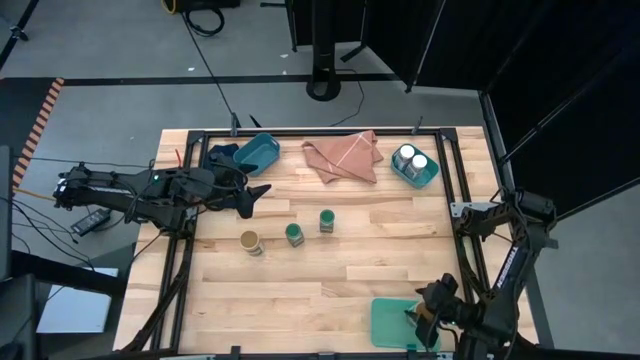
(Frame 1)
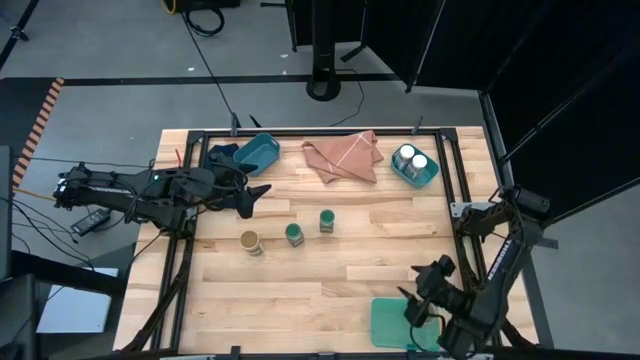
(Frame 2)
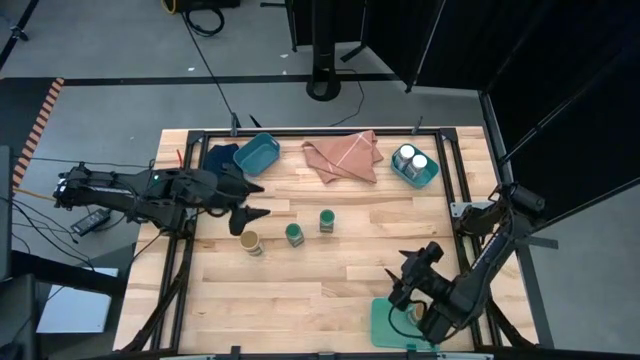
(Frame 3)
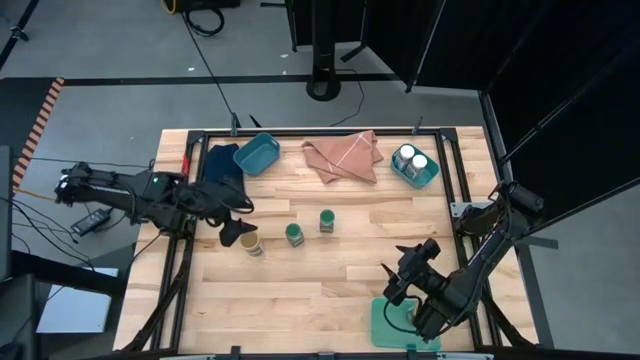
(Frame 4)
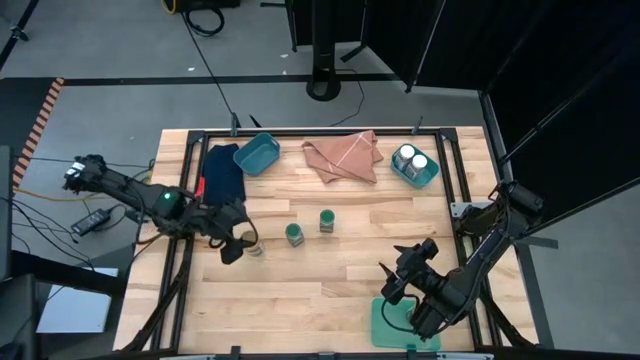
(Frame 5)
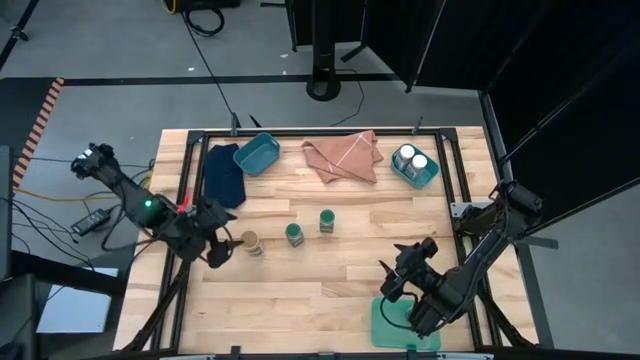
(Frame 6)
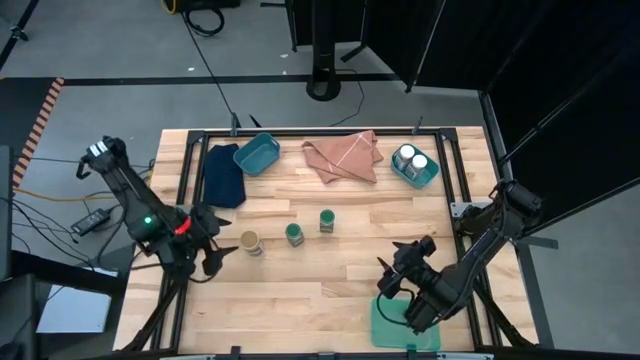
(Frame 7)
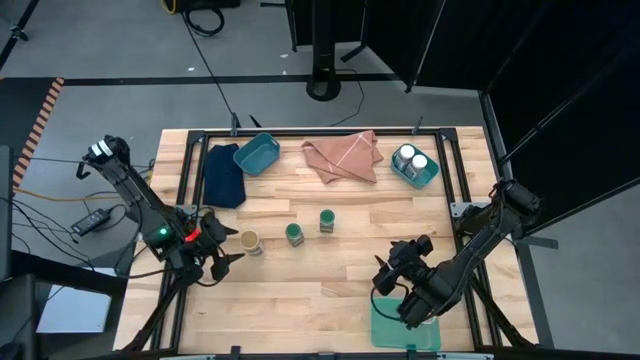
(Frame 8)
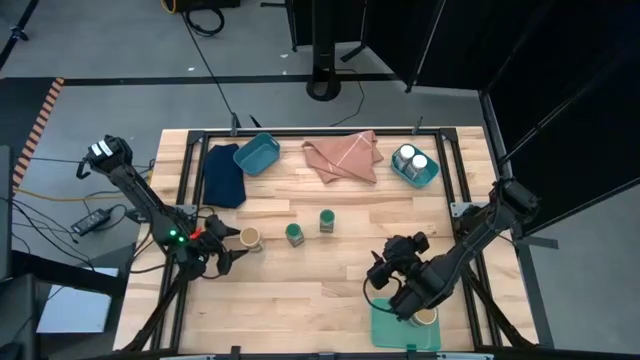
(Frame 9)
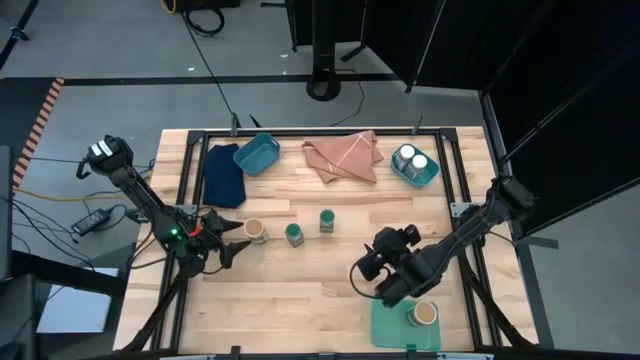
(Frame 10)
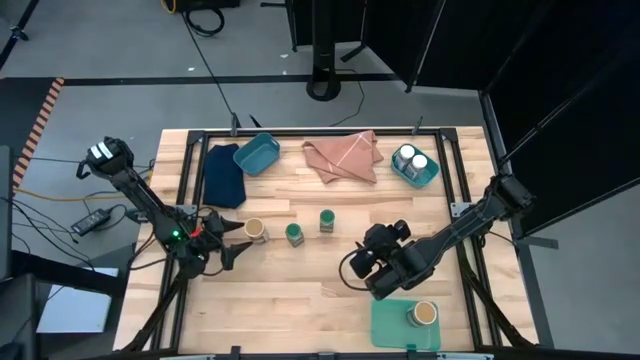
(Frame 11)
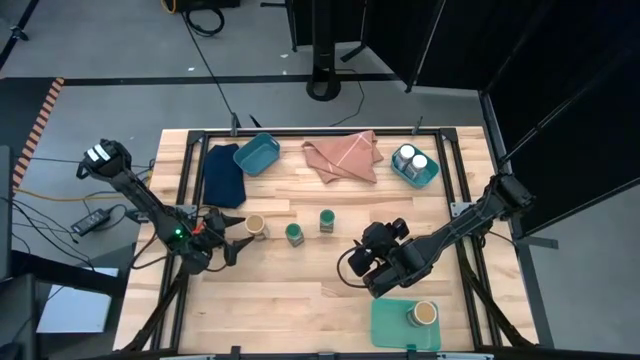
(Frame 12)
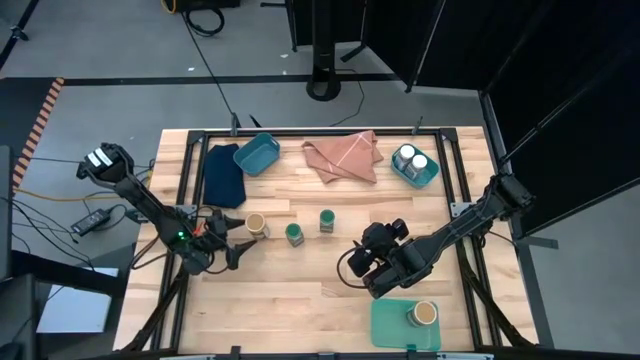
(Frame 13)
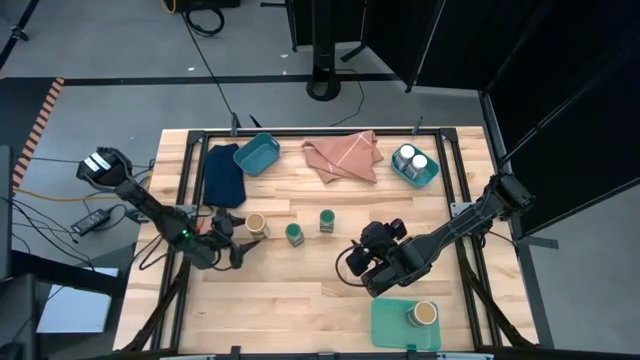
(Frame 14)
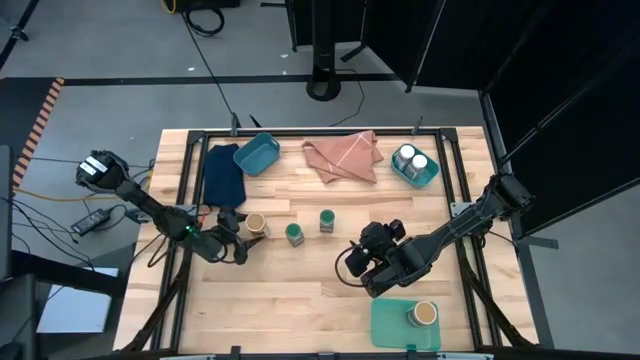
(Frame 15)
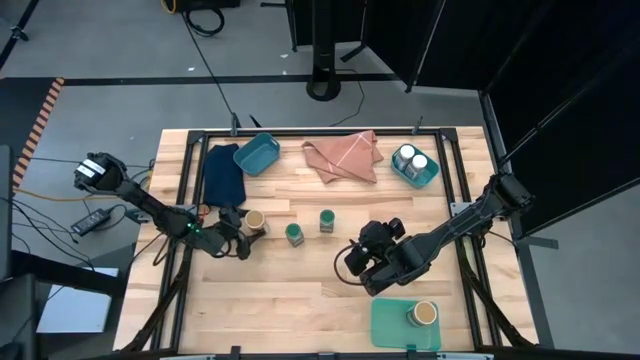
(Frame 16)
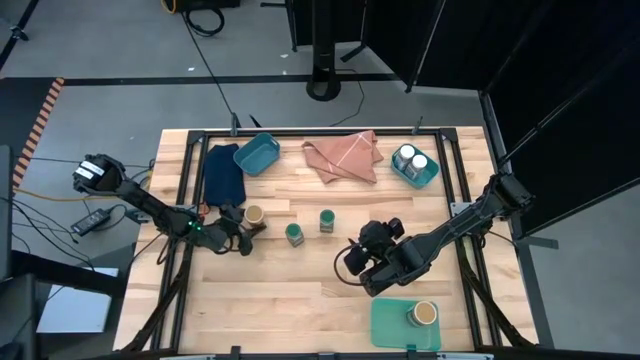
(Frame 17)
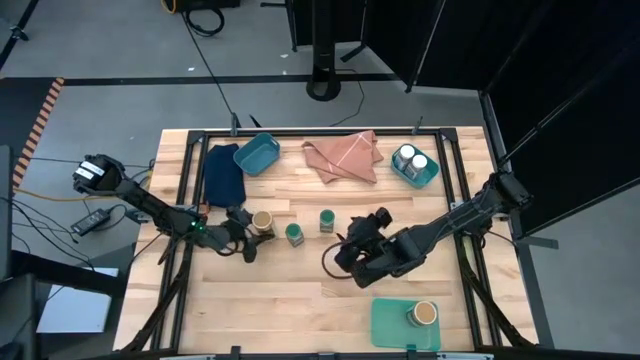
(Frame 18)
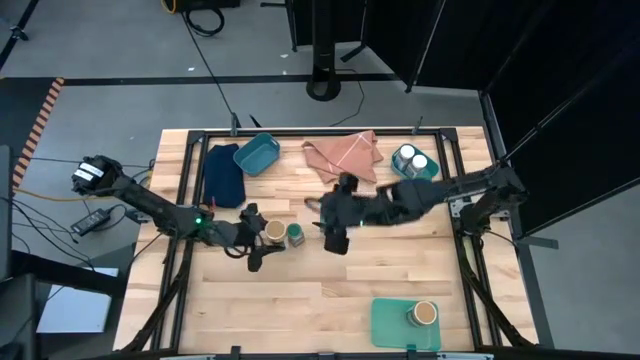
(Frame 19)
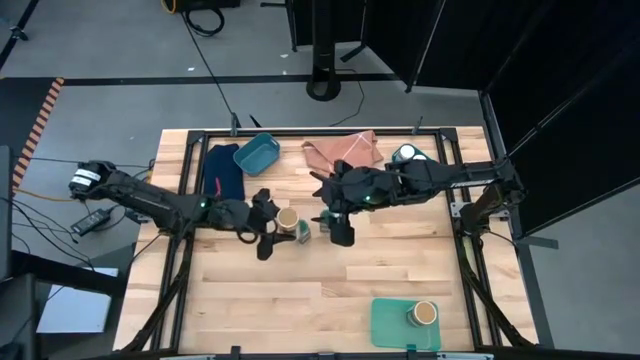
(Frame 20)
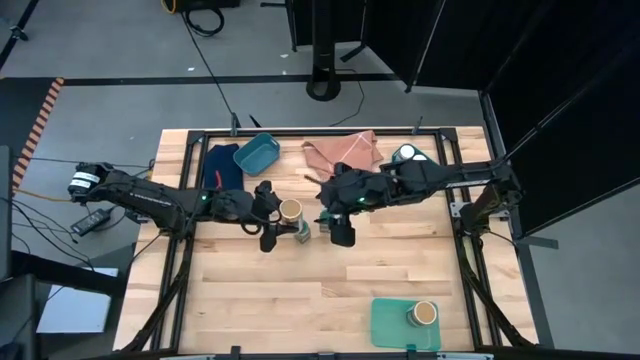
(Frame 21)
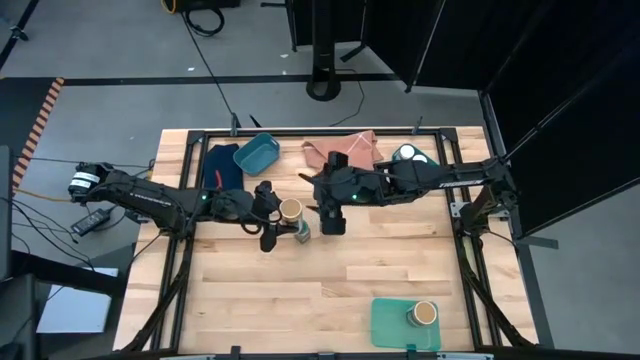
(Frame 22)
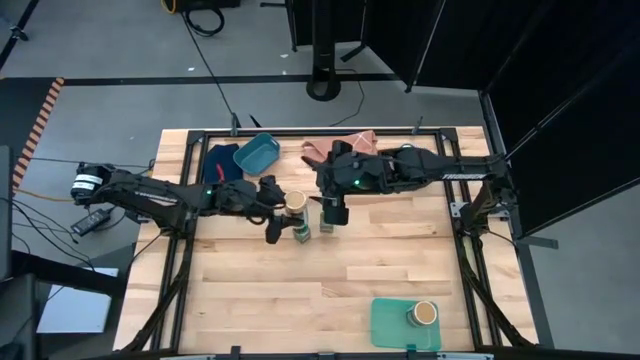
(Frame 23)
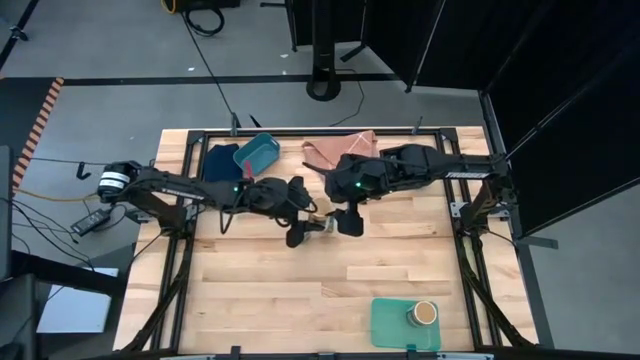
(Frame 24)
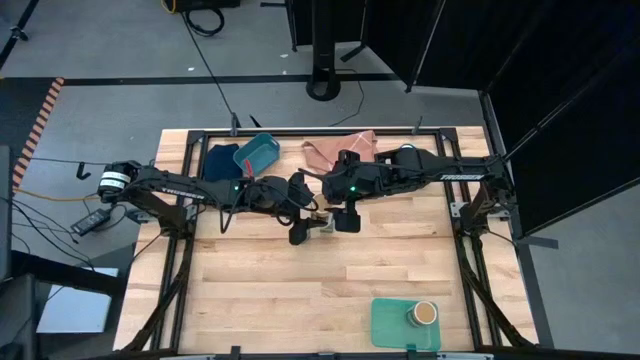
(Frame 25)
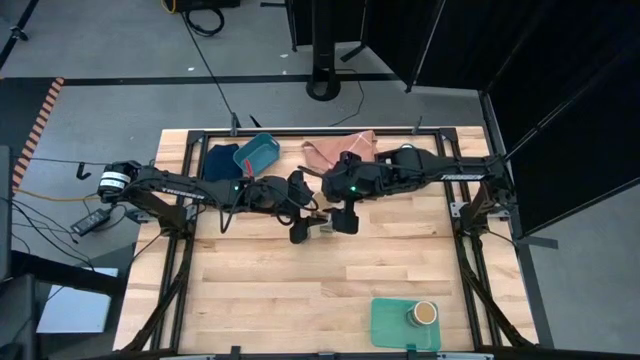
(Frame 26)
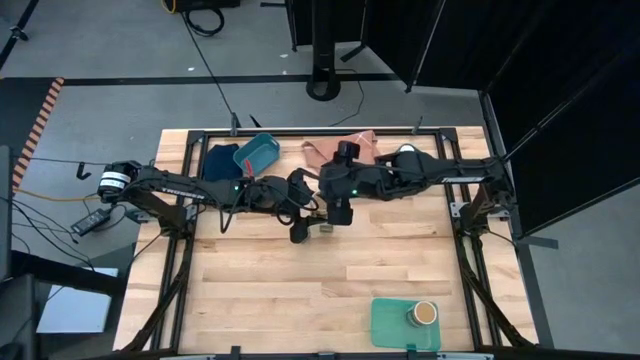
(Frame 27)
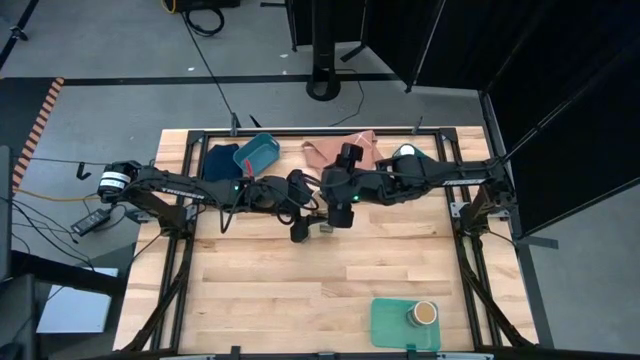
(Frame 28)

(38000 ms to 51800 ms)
Task: Sort spices by type
Put the gold seasoning bottle into the light green bin

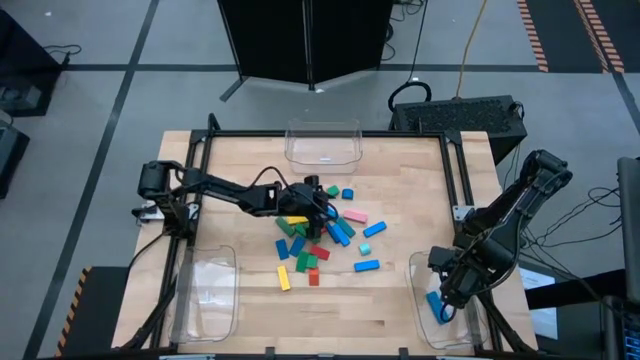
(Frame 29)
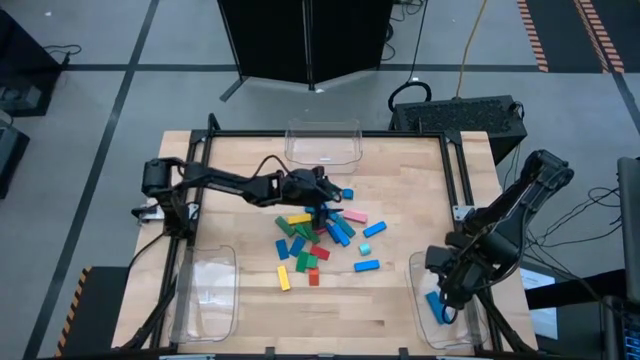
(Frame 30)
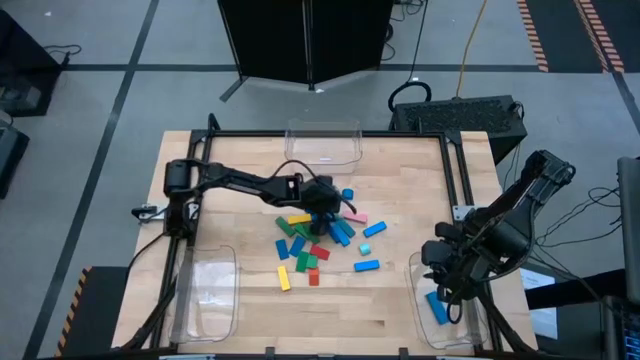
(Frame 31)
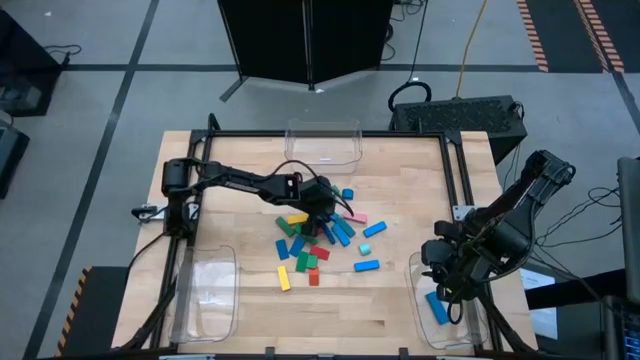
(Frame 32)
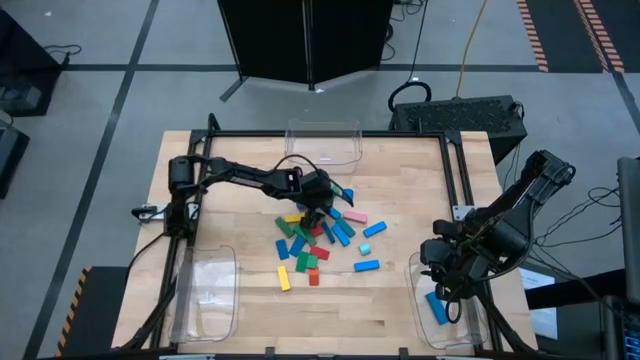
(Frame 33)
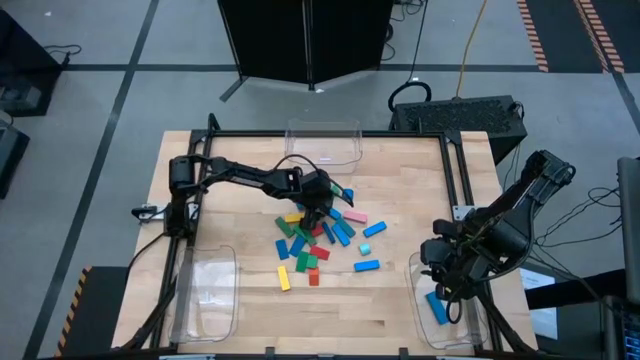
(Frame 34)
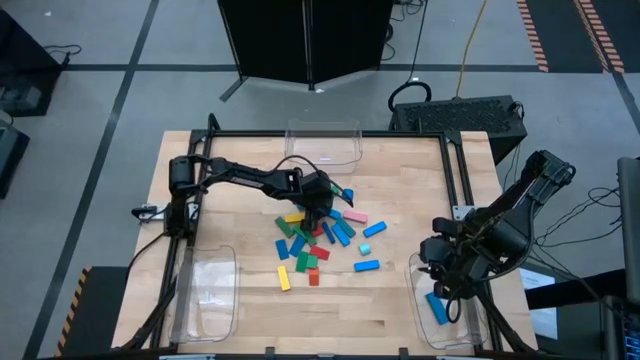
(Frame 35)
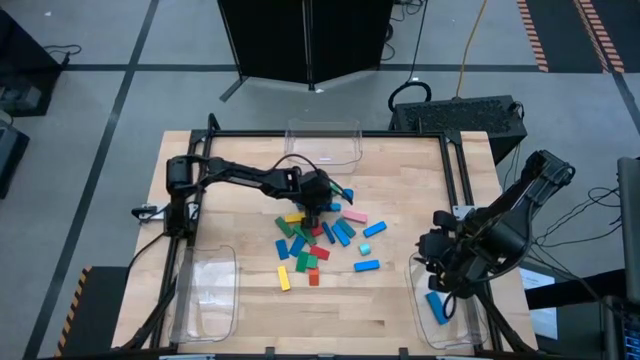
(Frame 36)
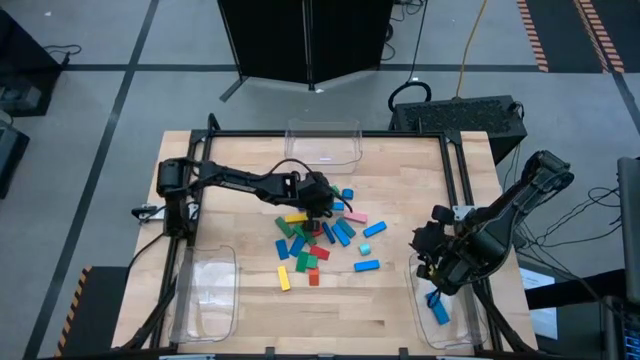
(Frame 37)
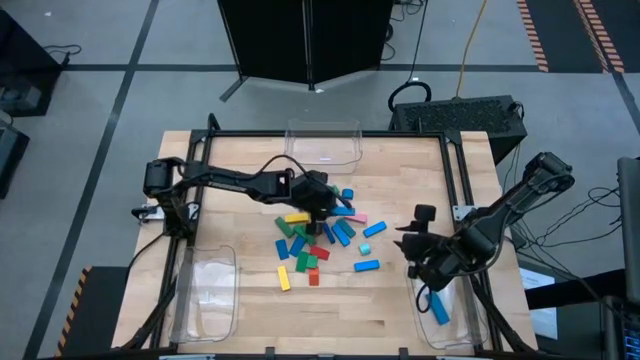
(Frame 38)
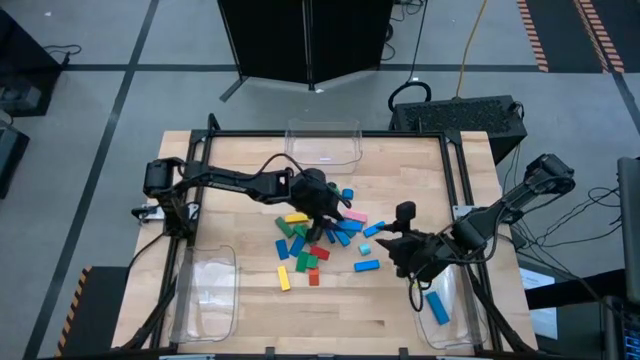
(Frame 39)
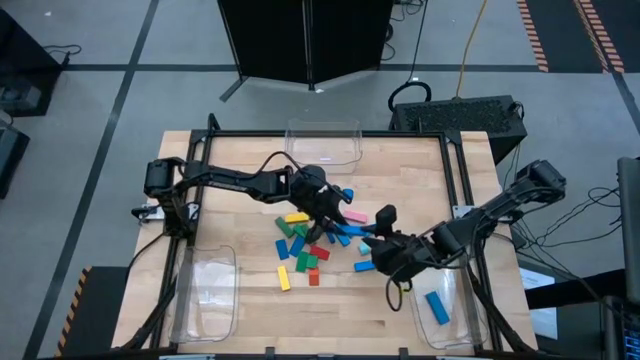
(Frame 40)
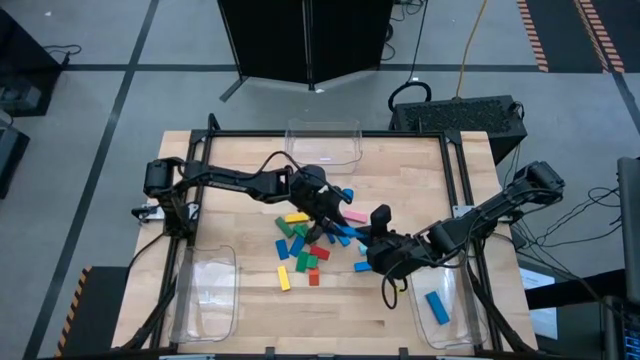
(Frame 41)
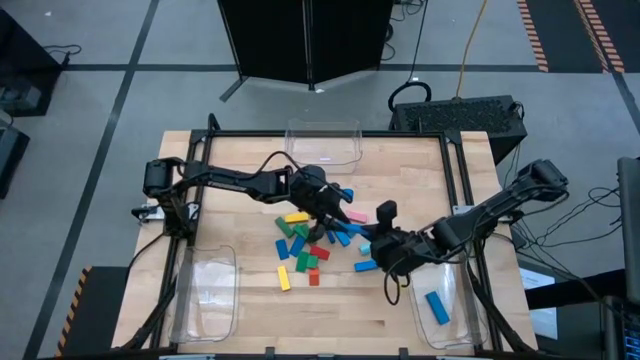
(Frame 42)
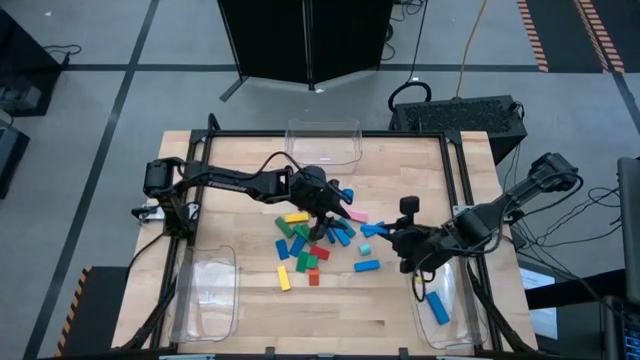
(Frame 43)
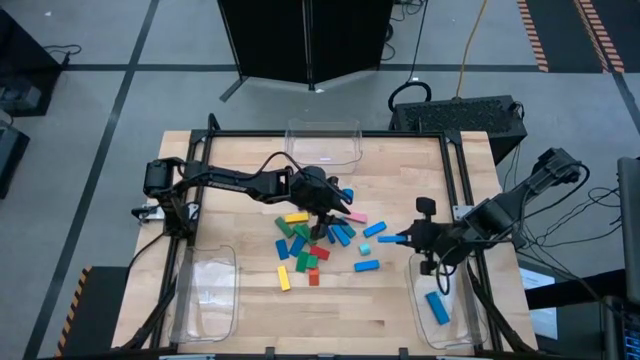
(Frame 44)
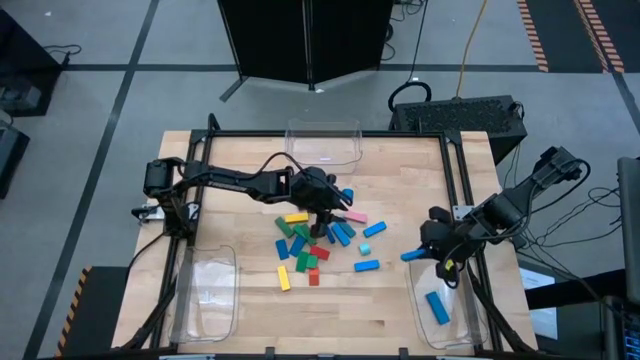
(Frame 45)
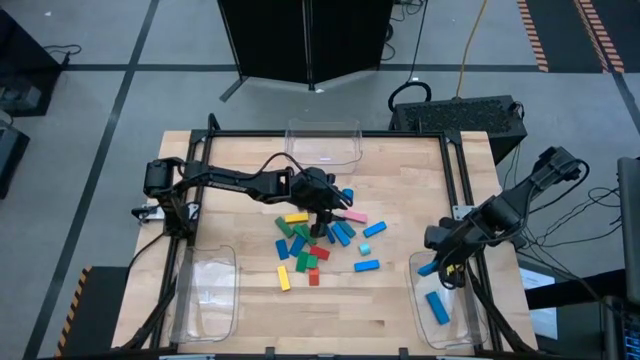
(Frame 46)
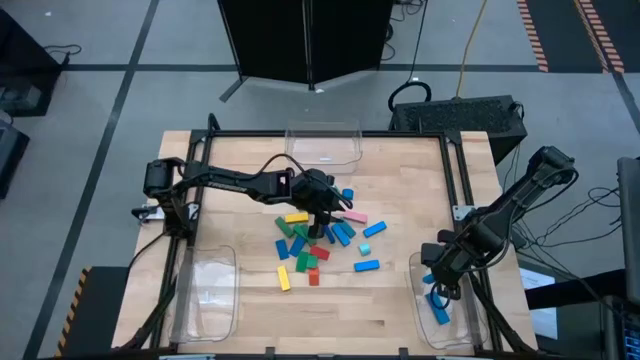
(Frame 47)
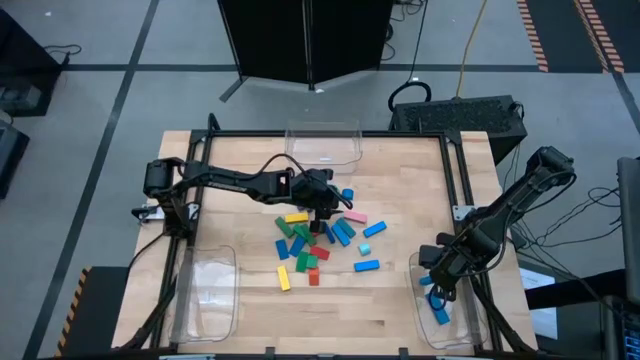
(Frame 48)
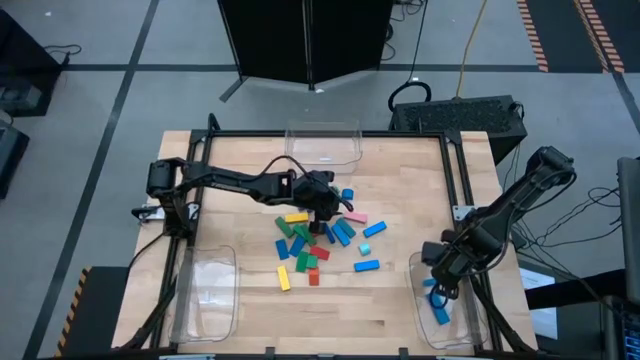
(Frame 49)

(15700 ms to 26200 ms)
Task: Sort blocks by size
Put the light blue rectangle block into the bottom right transparent bin
